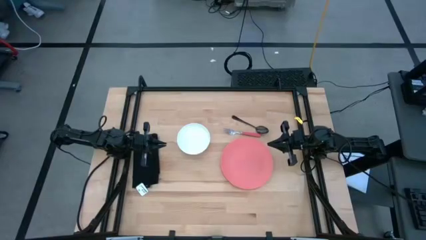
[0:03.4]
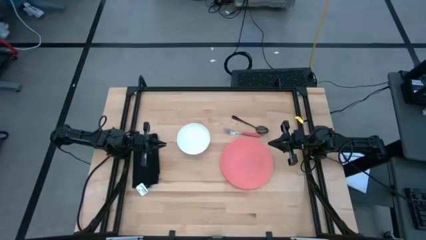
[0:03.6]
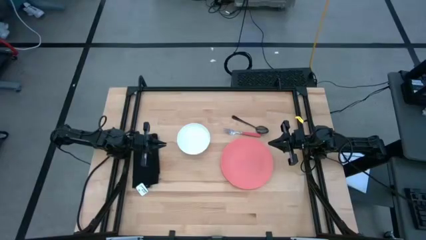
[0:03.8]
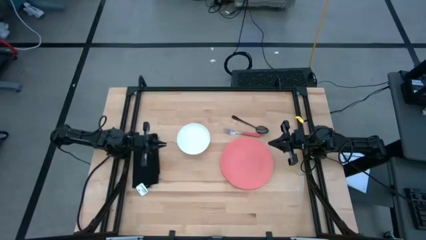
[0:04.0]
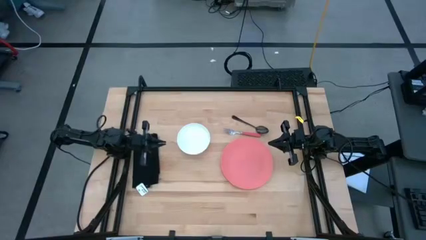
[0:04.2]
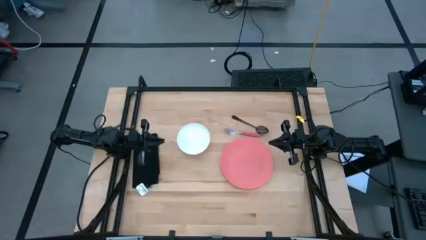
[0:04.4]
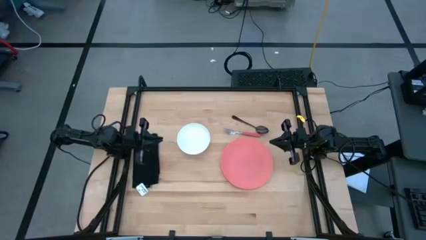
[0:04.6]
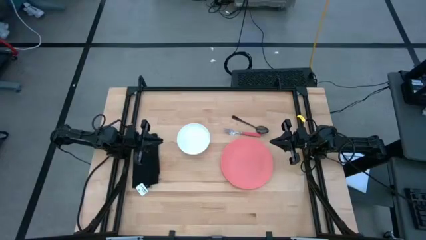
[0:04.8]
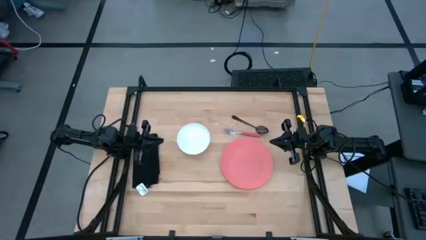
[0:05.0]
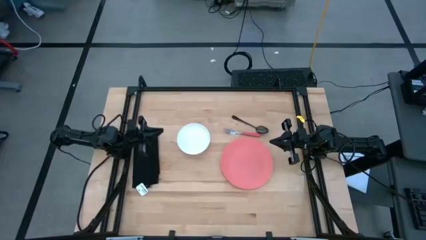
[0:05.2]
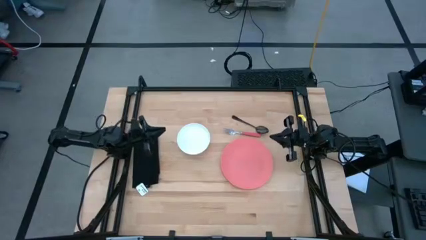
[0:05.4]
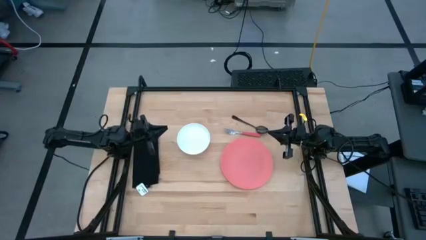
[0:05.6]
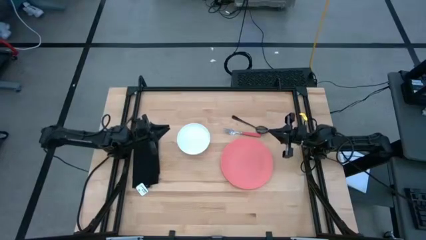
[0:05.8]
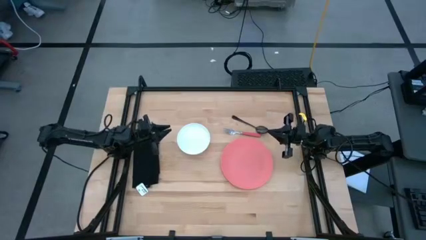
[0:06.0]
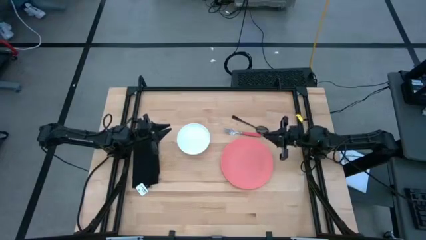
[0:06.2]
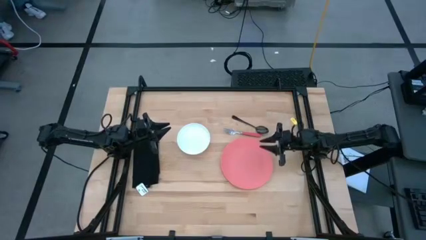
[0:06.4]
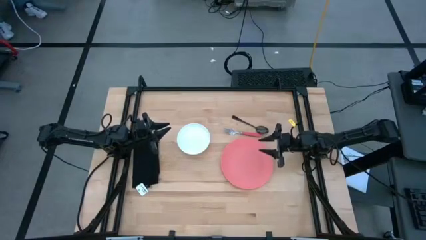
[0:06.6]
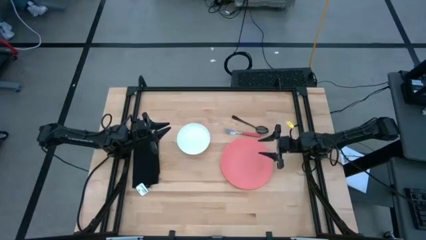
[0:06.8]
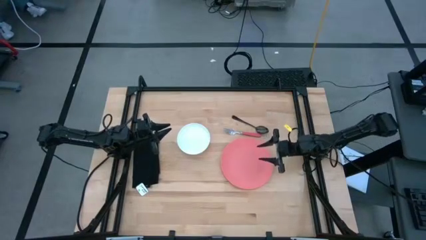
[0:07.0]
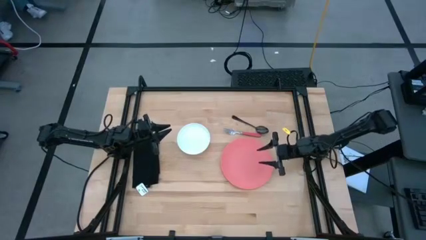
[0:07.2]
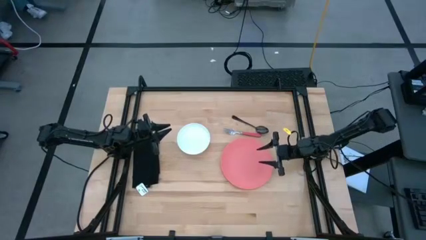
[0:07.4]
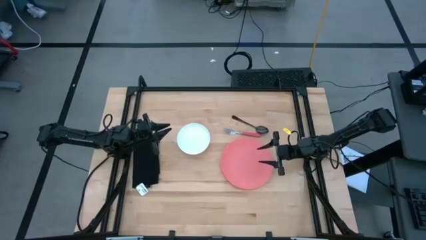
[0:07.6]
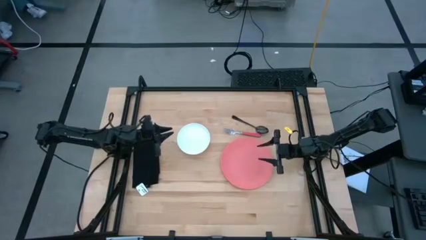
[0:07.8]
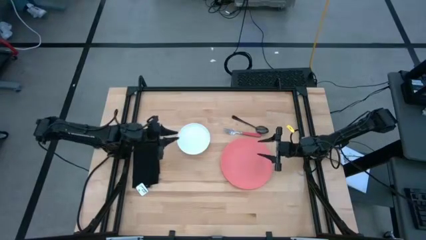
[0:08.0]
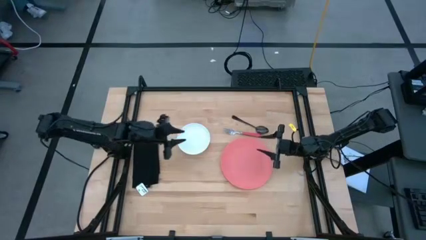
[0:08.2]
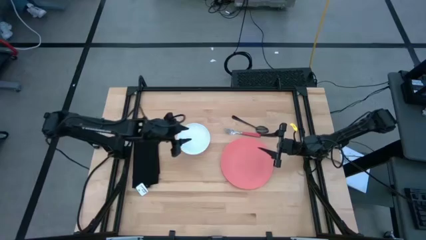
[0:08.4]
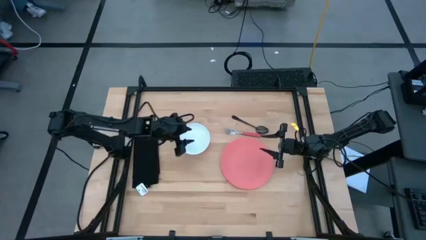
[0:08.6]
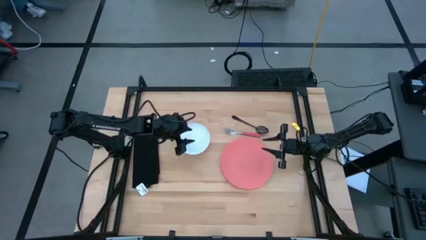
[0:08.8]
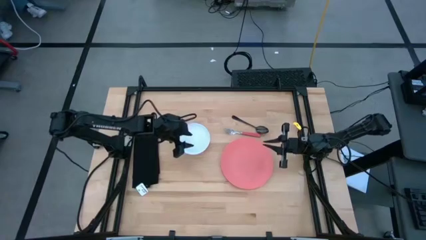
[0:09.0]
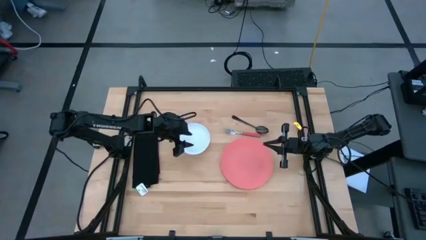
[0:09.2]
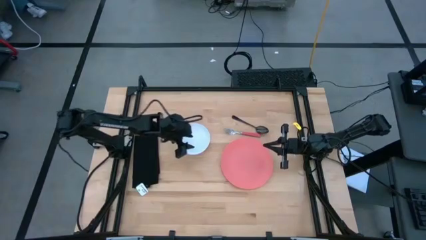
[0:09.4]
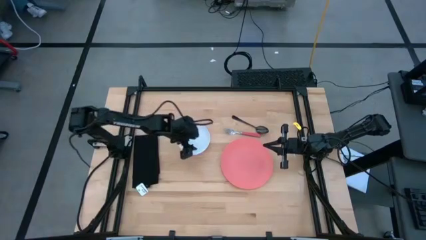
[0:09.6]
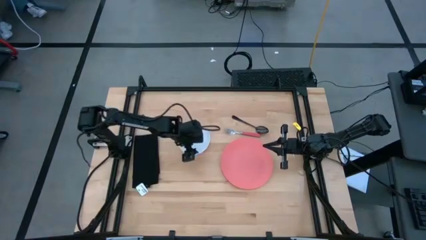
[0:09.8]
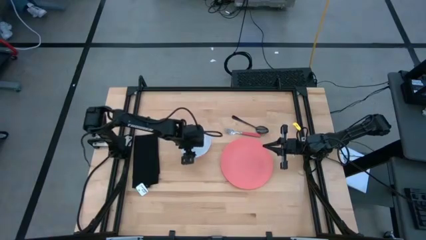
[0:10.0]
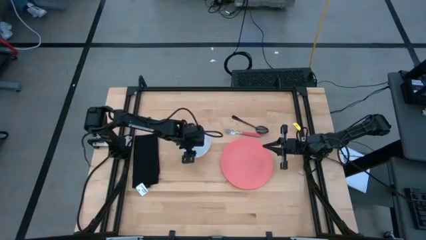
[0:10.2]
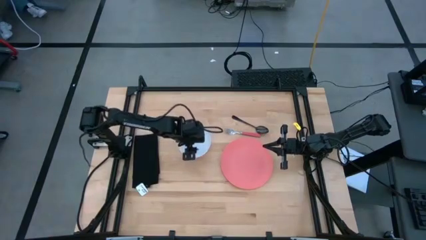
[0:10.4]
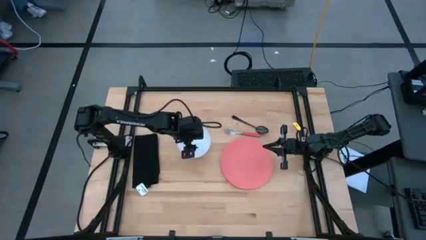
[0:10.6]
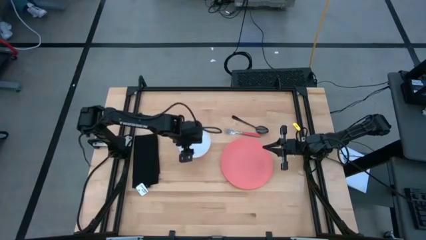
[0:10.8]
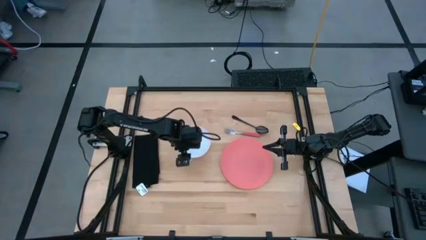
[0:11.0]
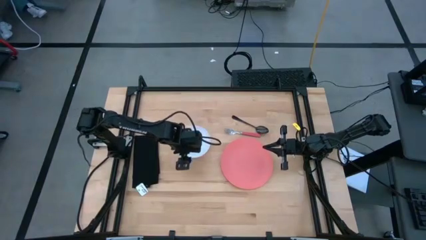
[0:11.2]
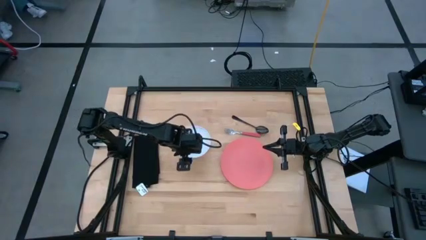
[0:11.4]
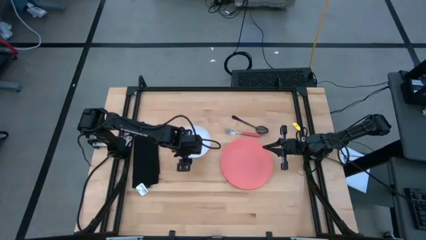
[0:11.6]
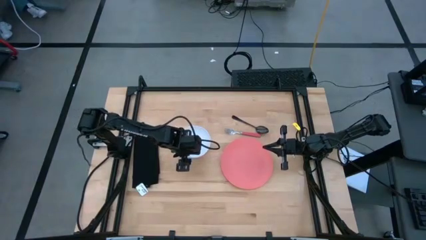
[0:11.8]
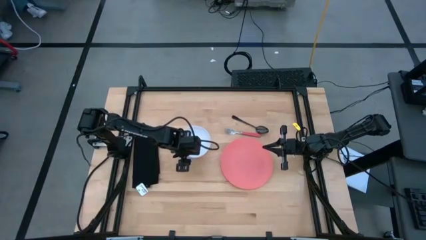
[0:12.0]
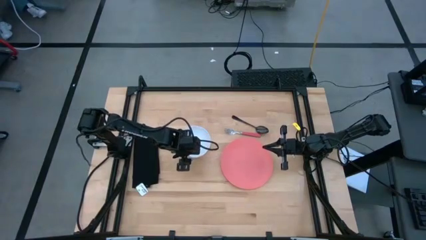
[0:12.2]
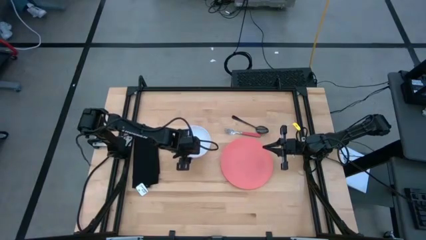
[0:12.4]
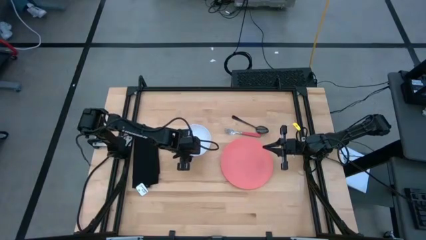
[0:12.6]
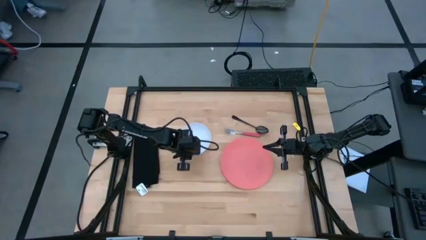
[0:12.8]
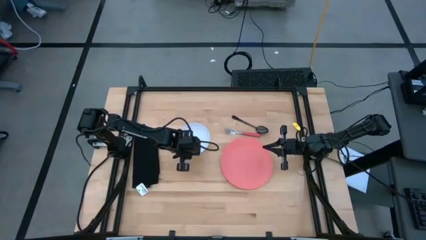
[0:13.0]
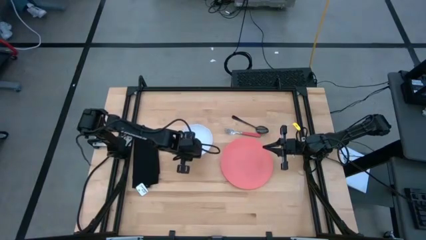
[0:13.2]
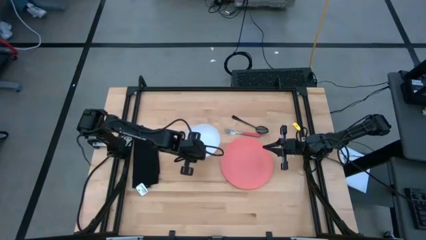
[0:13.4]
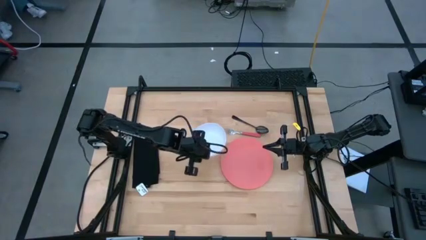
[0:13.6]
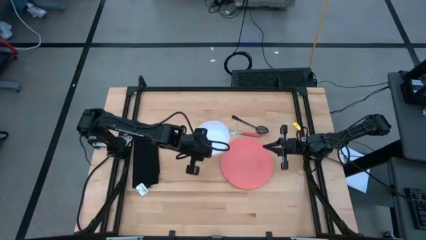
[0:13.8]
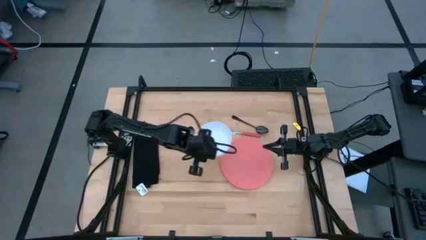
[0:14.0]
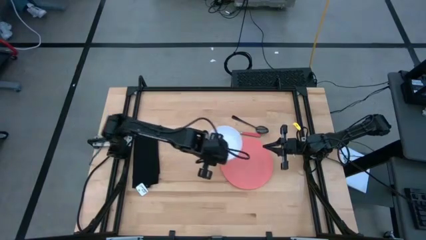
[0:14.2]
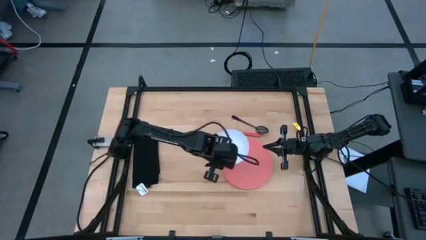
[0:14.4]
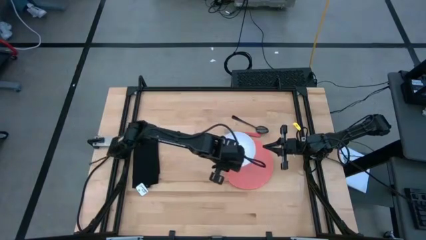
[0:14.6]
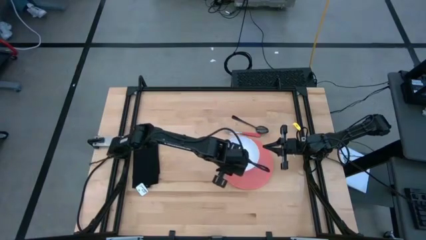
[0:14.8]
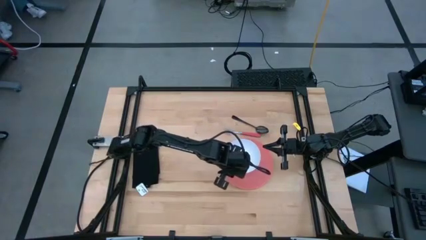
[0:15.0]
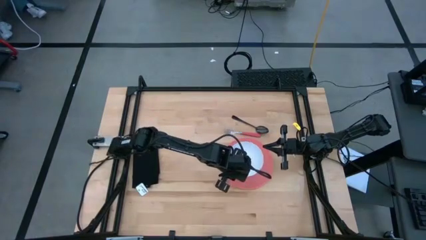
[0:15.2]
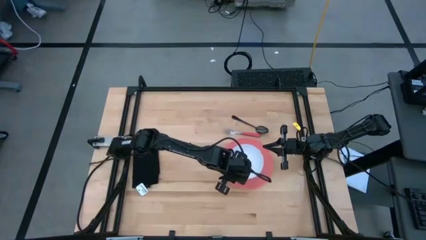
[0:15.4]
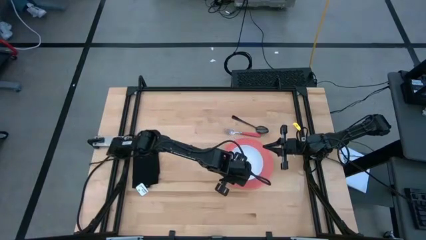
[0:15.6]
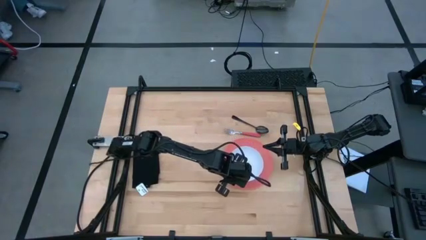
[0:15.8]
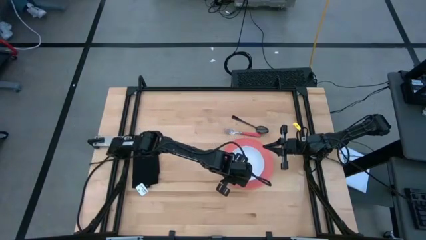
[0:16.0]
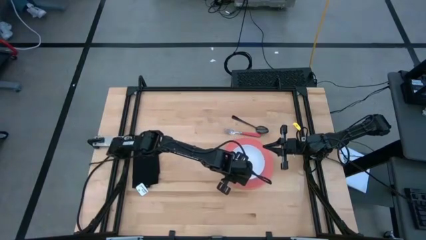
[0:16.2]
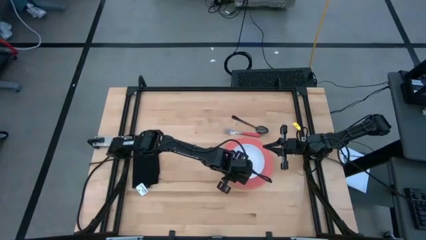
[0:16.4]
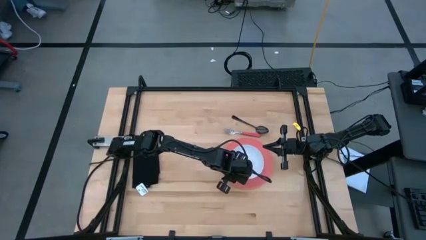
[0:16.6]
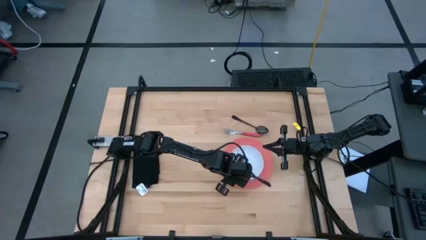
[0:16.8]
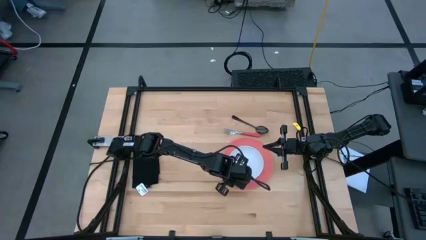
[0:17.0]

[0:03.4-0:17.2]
Task: Set table place
Put the white bowl on the pink plate
